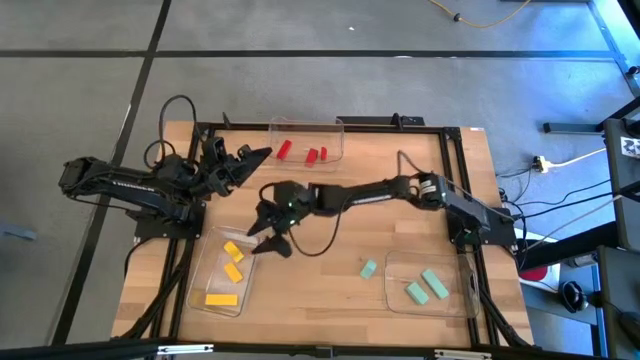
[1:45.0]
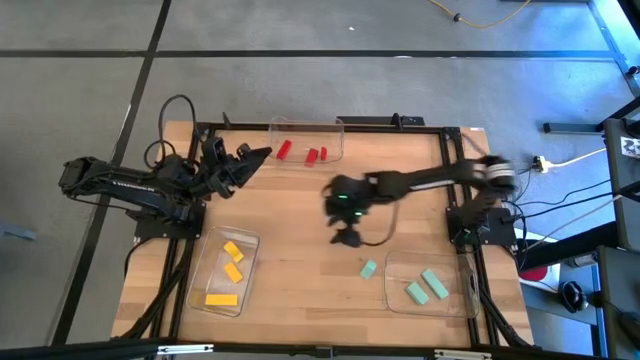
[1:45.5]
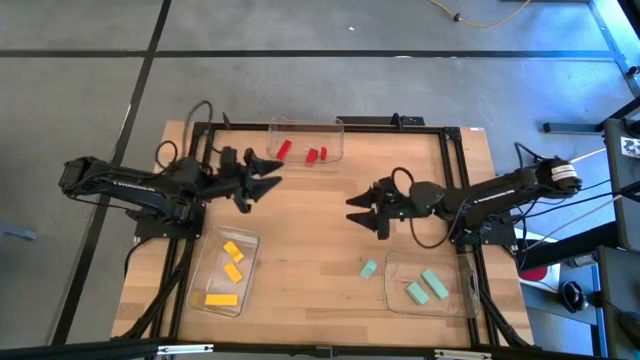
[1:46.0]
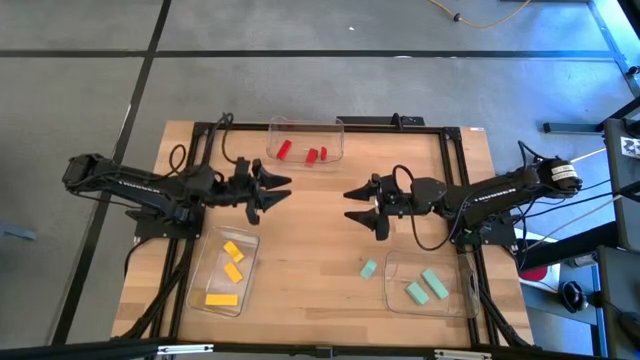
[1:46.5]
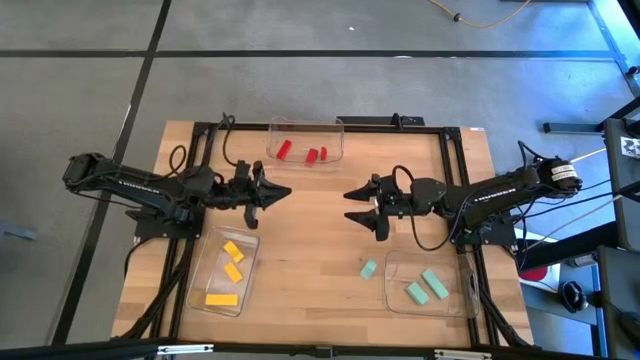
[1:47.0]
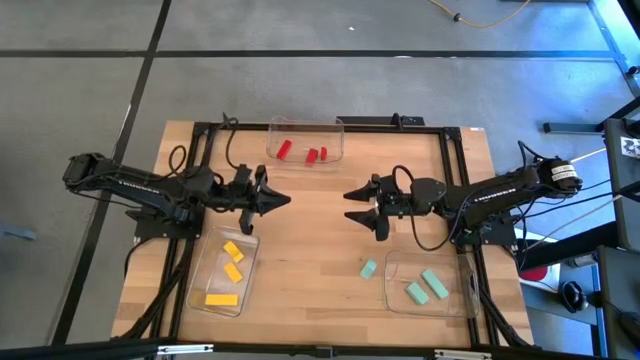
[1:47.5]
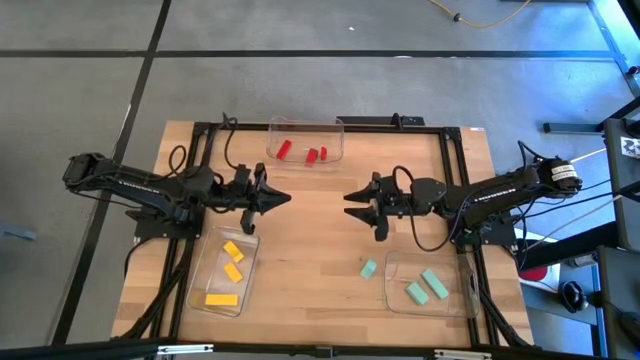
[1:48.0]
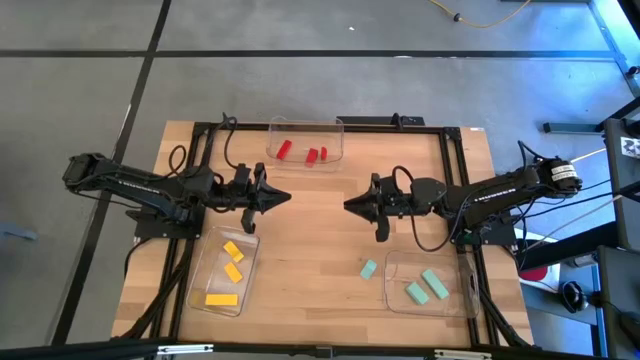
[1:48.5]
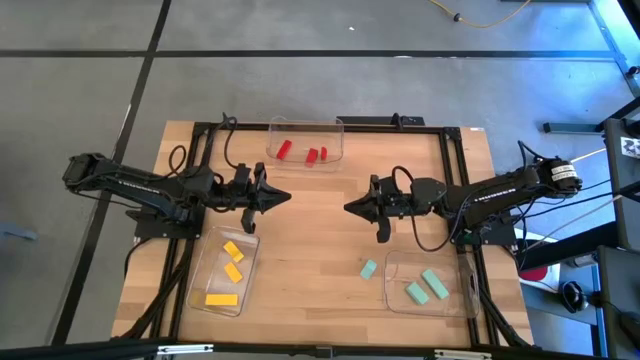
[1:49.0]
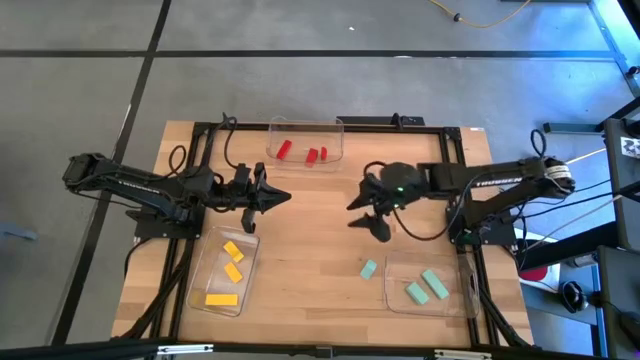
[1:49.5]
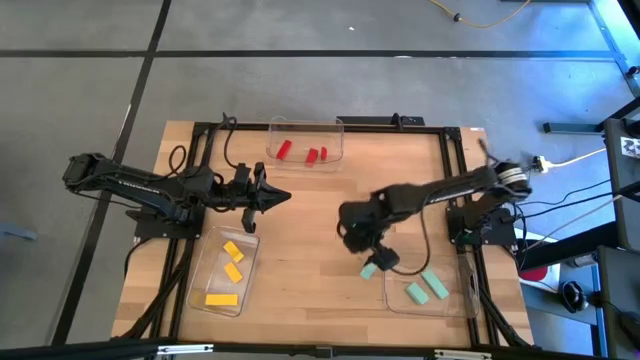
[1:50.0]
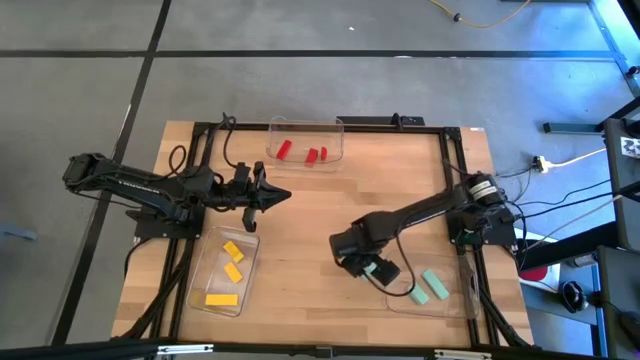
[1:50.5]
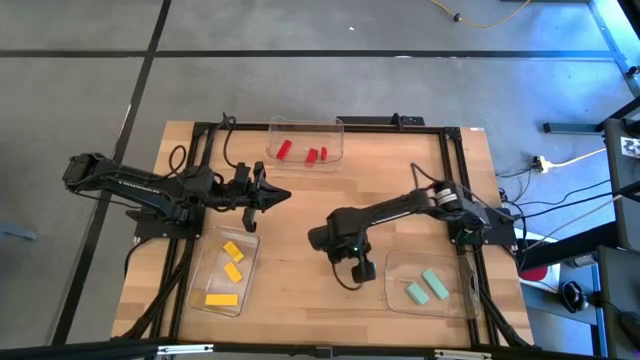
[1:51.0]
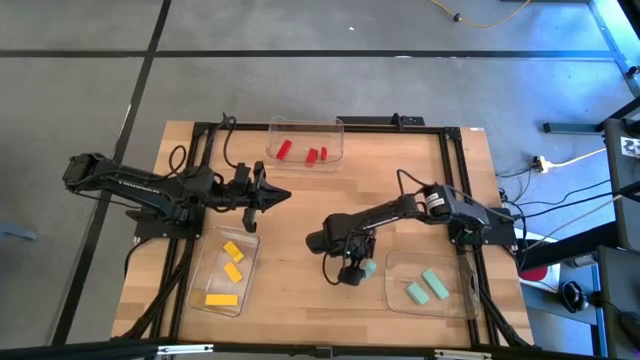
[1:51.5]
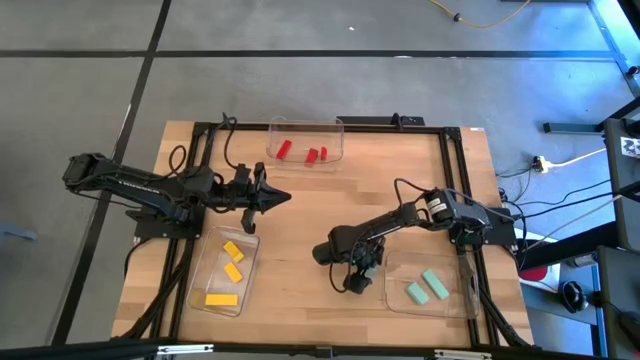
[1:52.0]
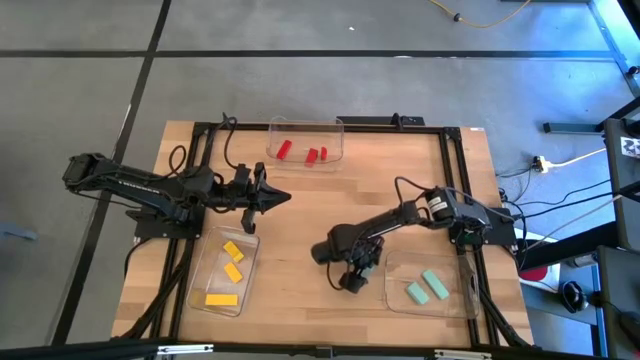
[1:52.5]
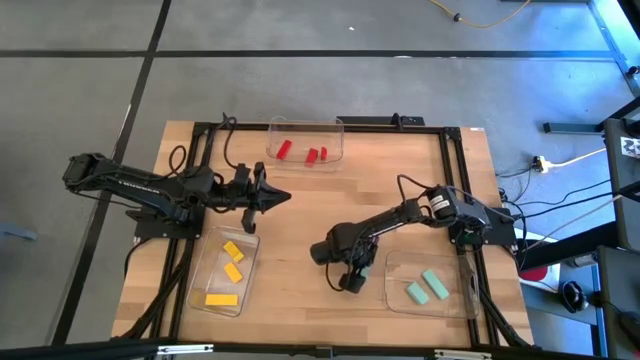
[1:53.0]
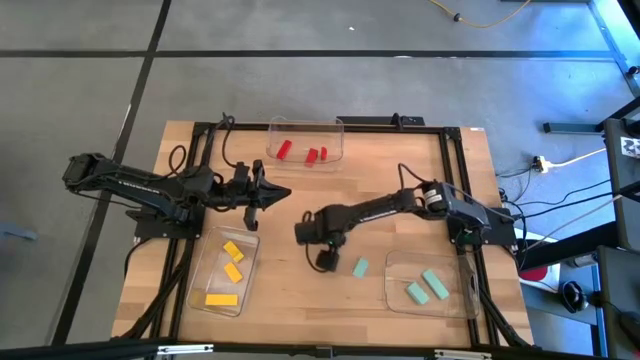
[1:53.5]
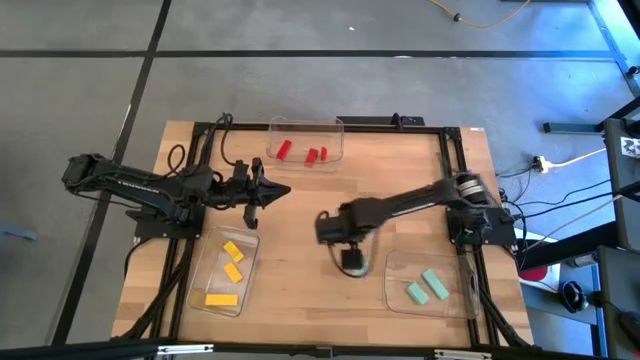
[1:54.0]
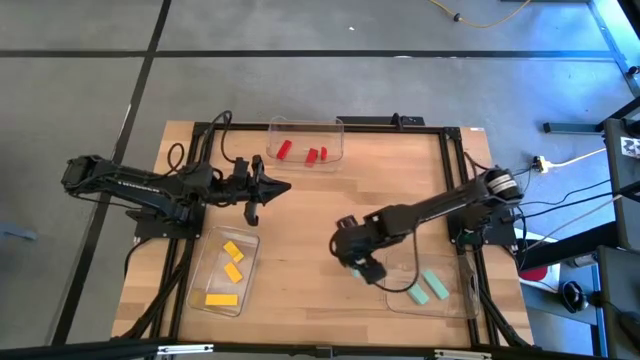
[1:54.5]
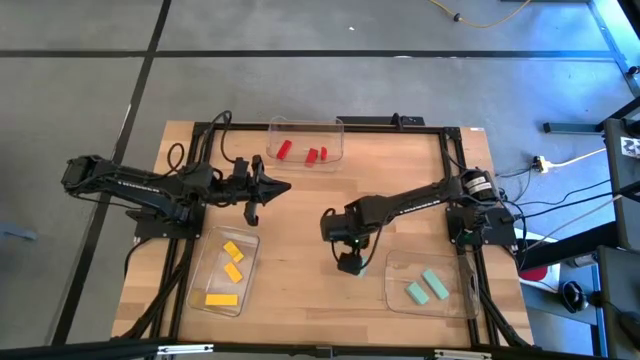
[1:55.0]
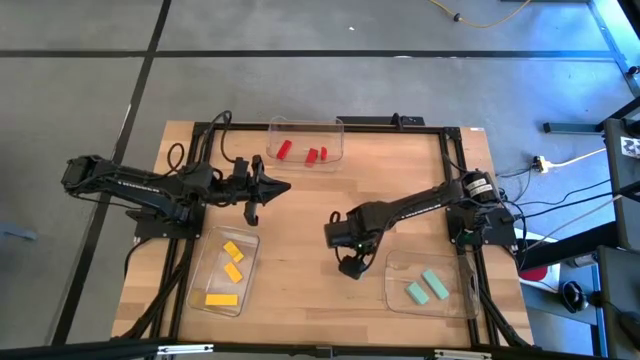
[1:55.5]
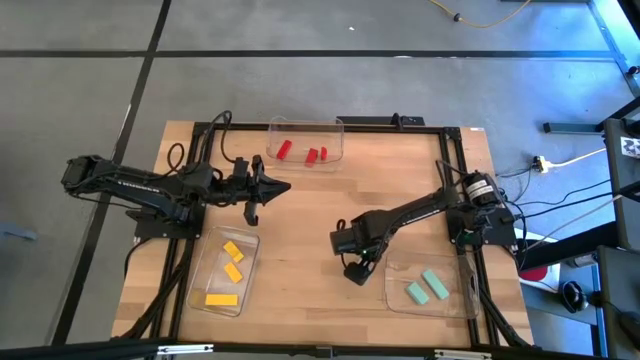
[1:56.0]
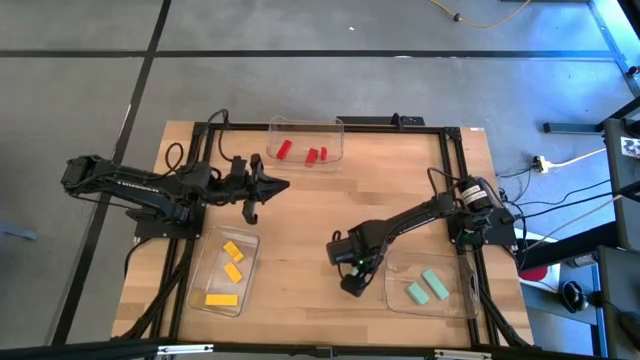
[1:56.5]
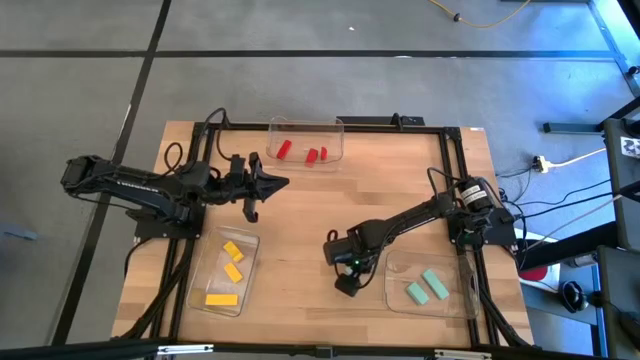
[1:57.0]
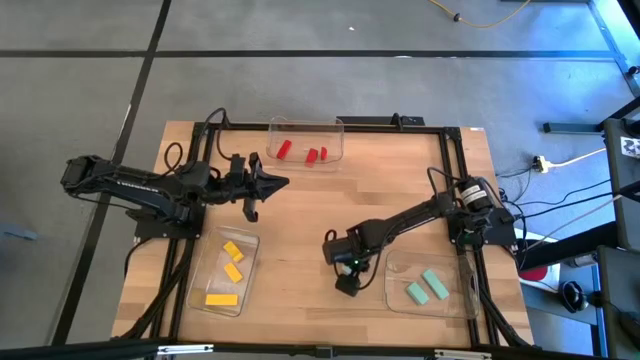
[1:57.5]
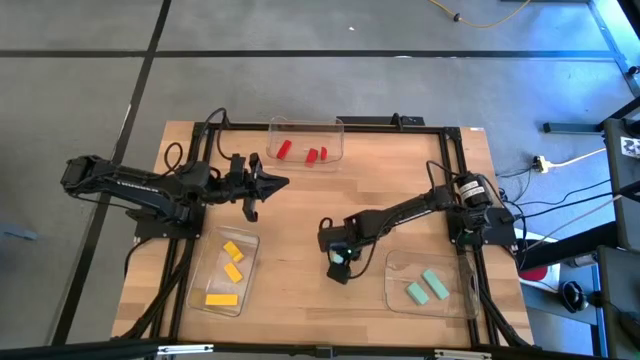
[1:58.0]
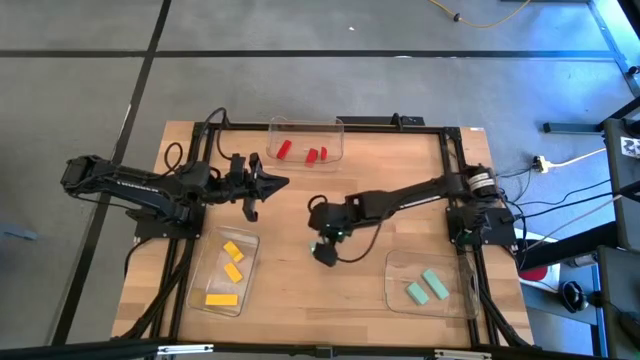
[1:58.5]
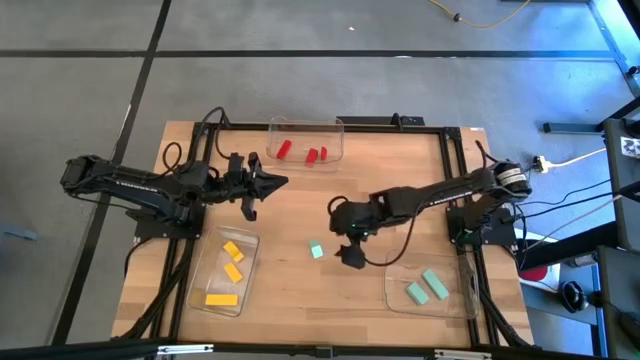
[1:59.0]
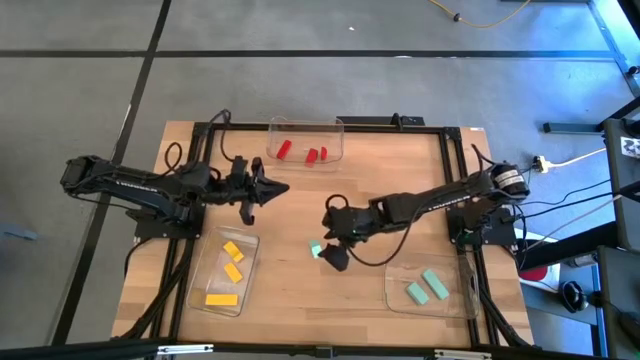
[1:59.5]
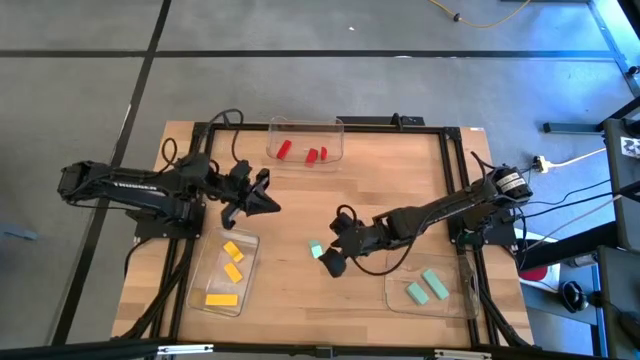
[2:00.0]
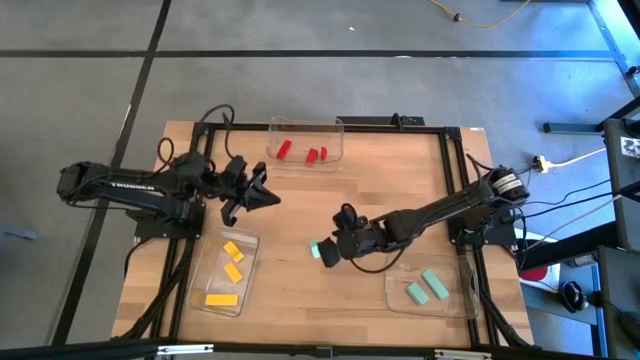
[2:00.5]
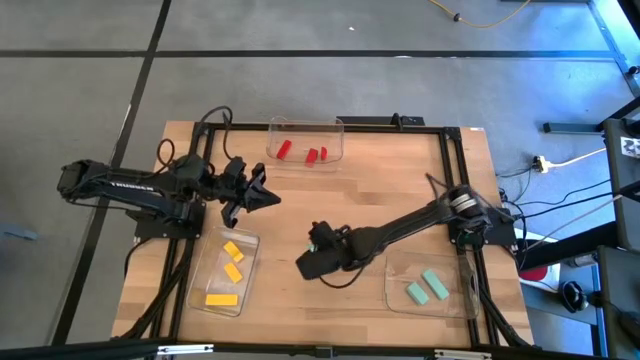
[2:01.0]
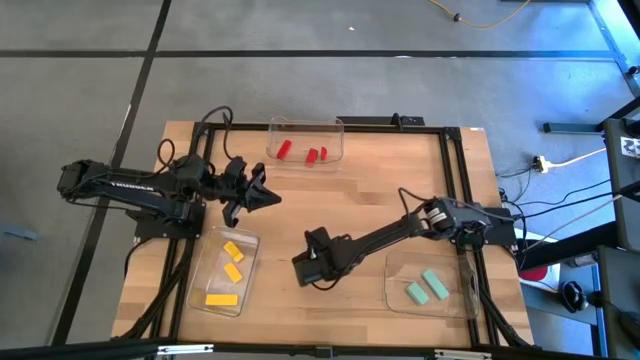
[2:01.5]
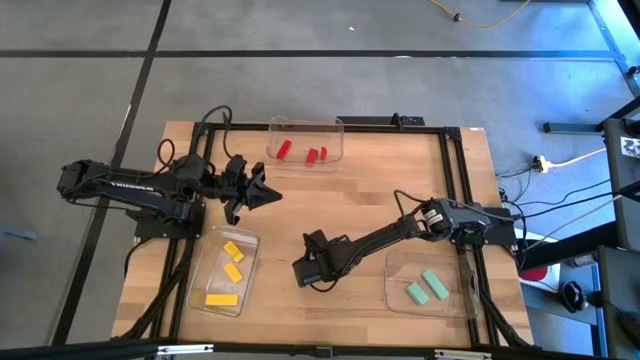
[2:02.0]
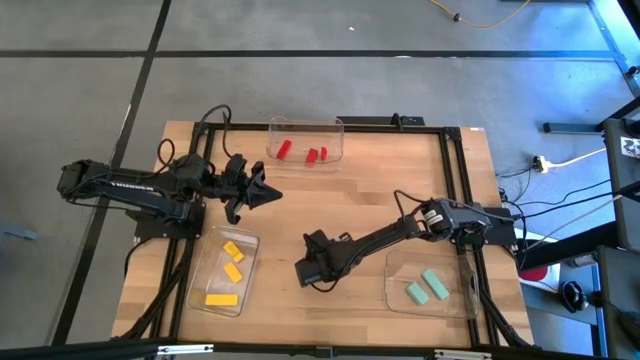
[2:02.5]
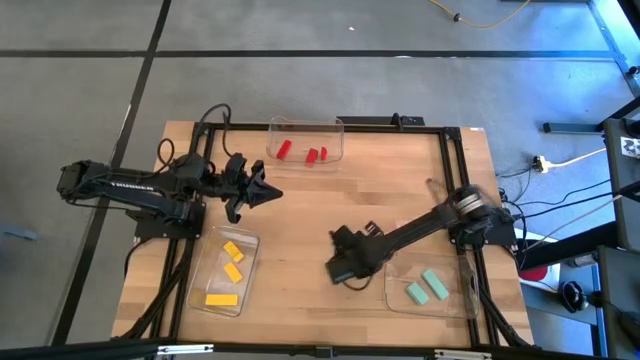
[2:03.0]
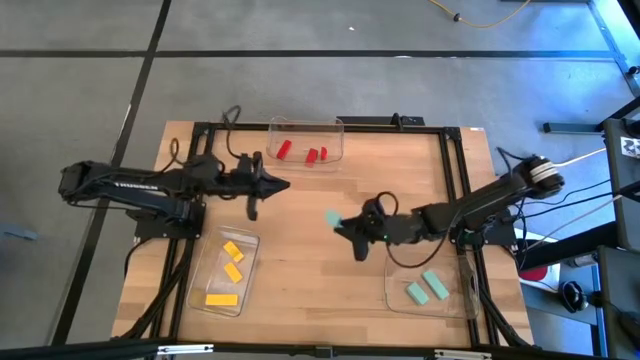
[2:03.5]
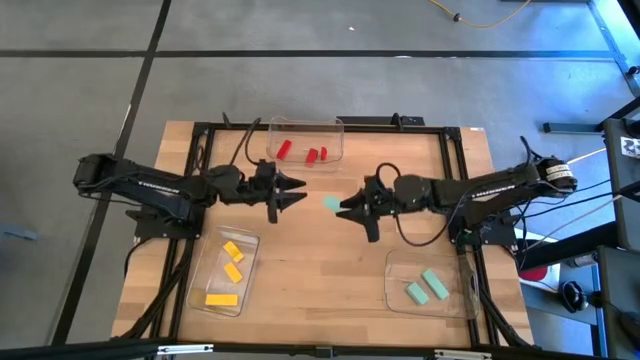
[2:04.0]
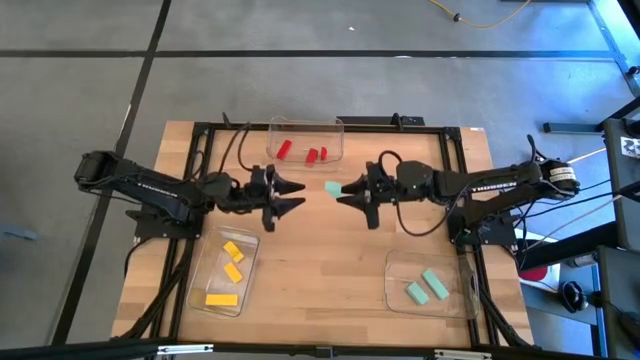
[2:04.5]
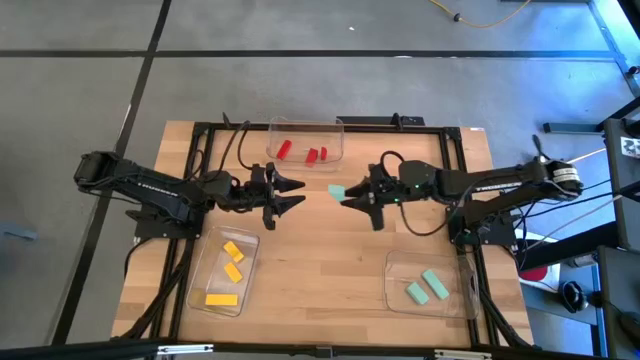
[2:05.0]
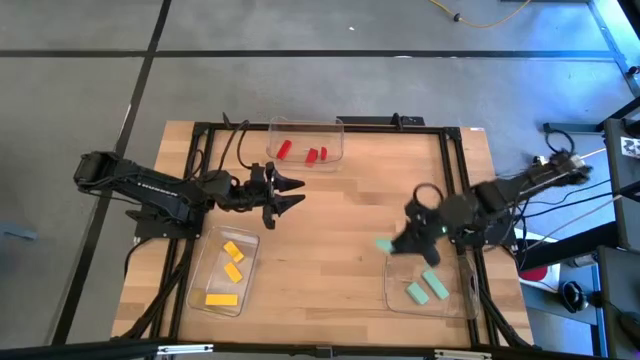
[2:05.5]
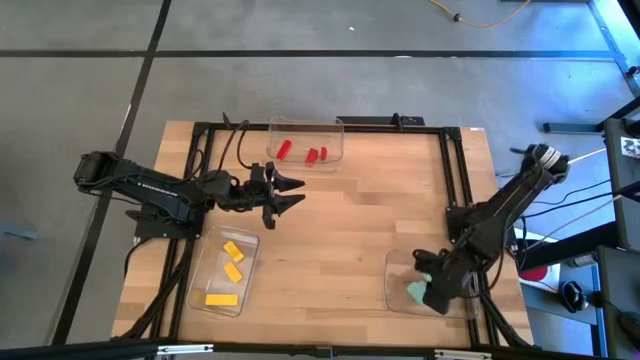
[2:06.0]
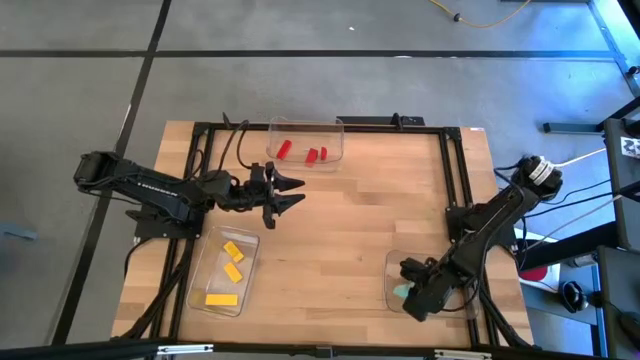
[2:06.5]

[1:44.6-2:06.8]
Task: Sort & place blocks by color
Put the blue block in the right transparent bin
